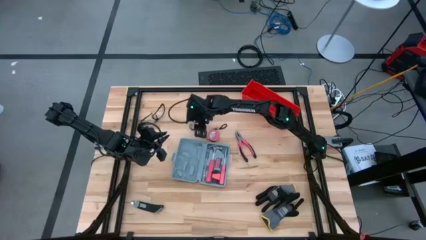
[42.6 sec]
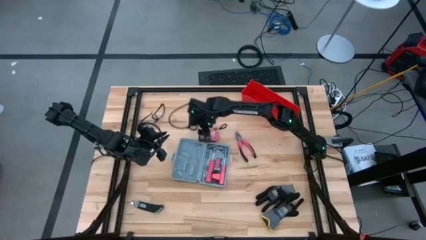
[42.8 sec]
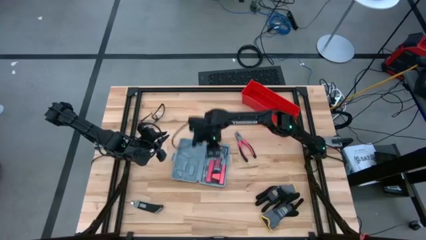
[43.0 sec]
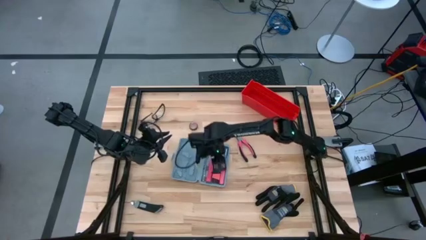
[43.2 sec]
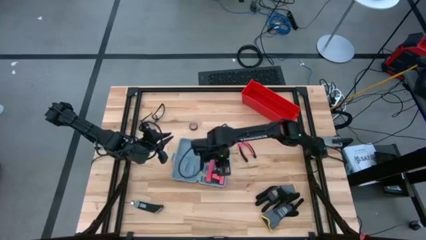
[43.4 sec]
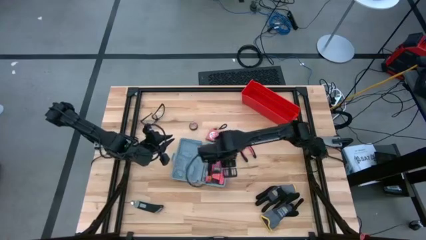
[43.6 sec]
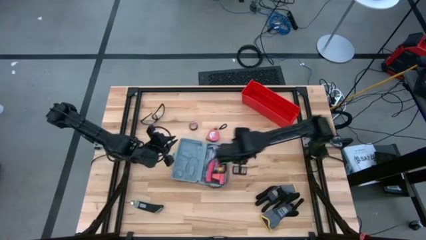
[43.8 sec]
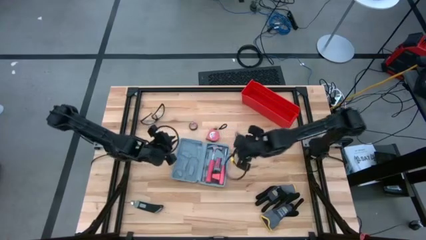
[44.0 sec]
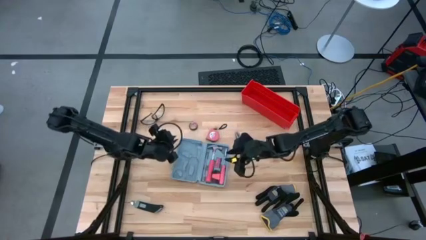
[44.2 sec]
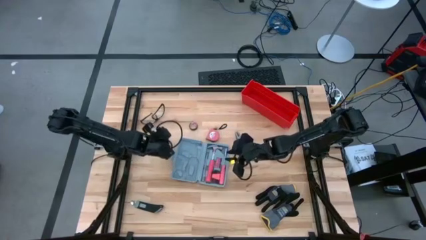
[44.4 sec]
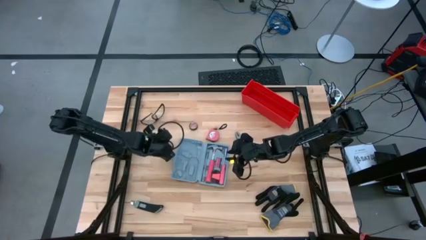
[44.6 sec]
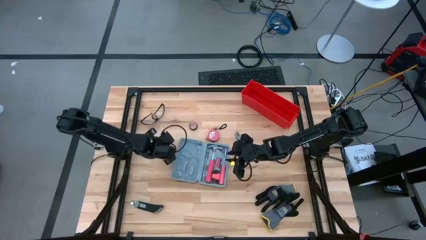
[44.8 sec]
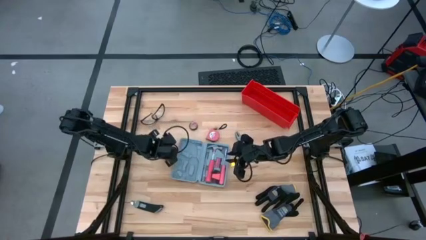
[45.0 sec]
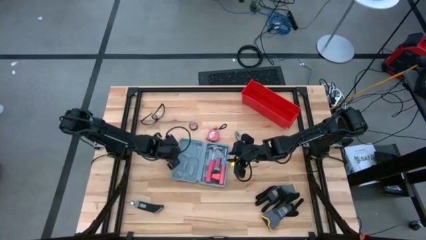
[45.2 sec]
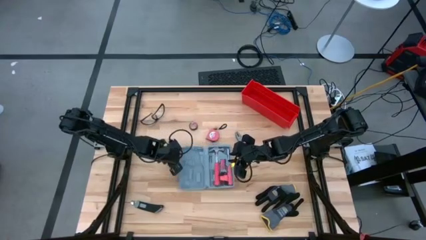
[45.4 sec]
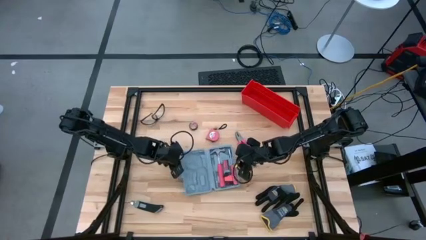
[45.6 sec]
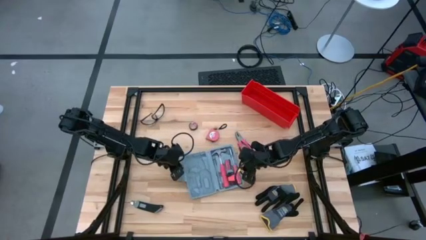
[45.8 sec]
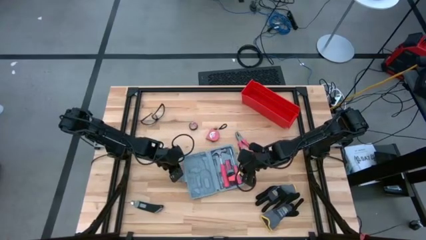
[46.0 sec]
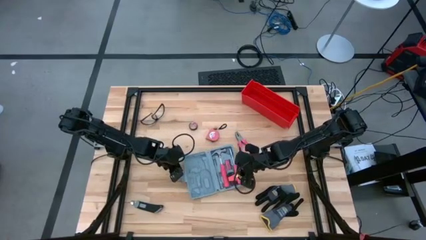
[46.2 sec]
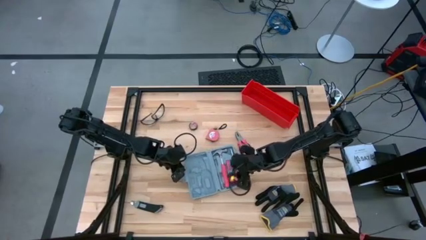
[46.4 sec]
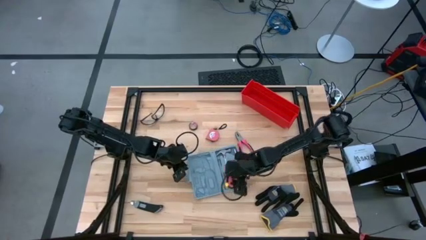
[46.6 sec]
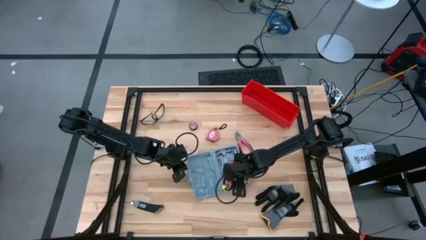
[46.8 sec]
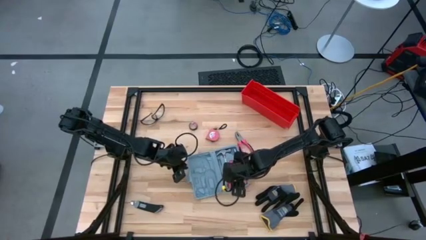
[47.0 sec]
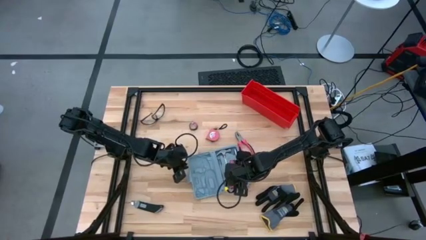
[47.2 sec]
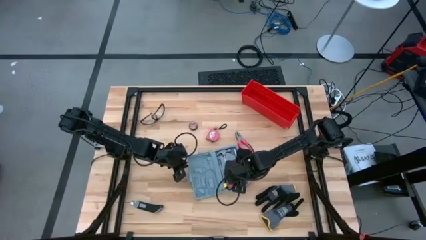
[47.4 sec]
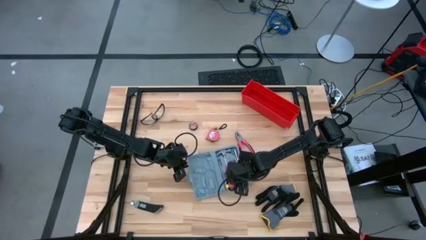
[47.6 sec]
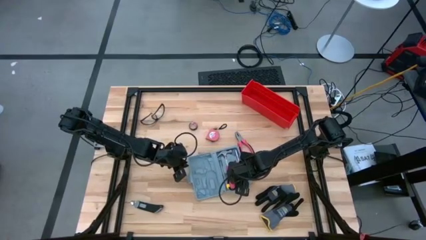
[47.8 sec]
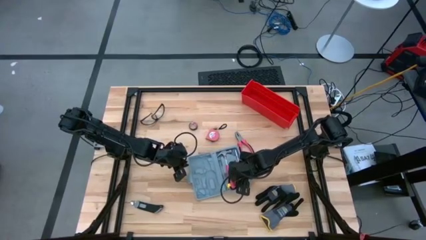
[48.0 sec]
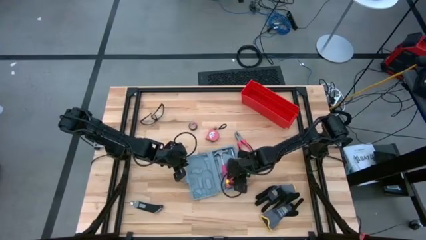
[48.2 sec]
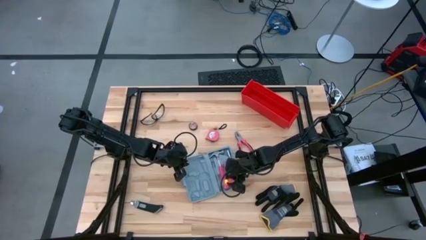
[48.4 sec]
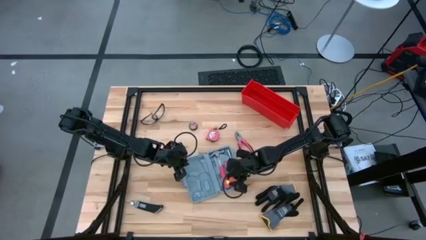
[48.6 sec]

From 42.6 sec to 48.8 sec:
Task: prefit tool cases
Remove the hex key set from the toolbox

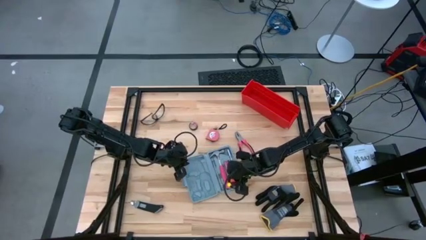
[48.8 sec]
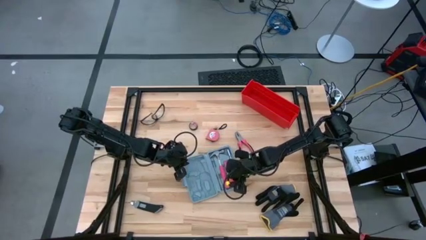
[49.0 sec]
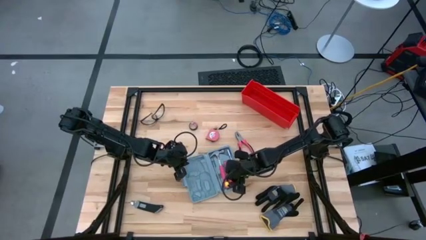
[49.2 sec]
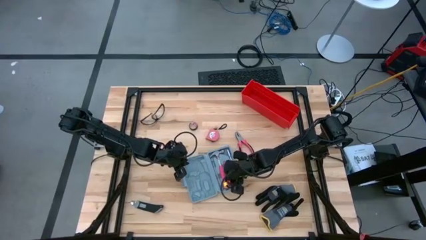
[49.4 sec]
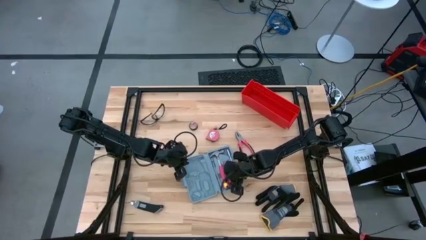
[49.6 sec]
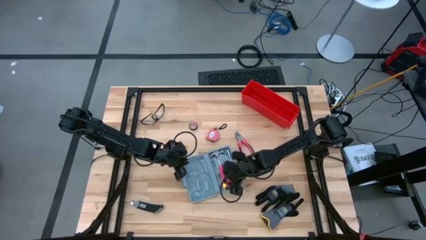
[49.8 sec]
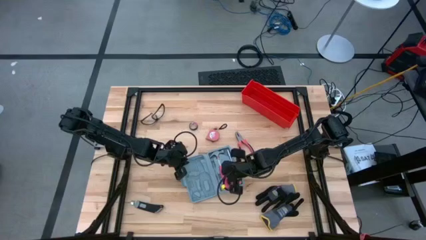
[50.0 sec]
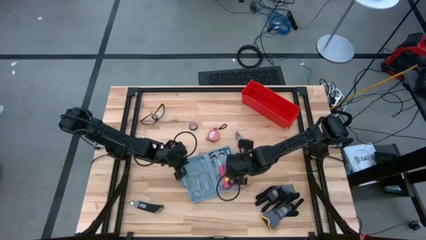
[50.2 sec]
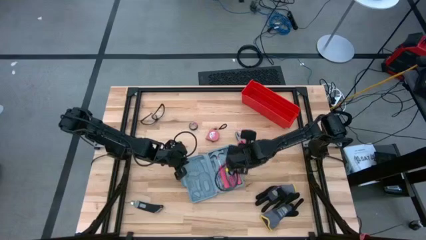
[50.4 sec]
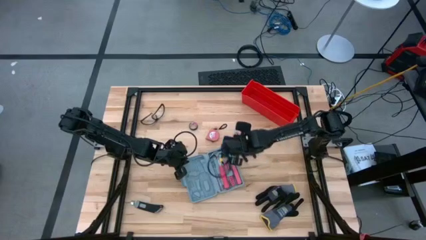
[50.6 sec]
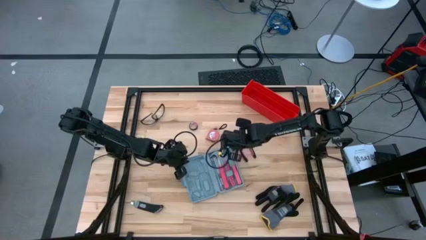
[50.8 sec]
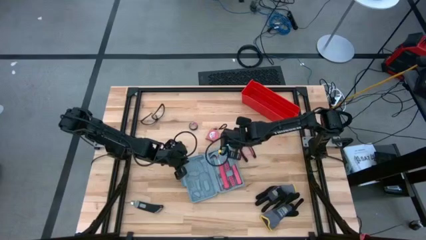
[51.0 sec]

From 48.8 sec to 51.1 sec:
Remove the hex key set from the toolbox

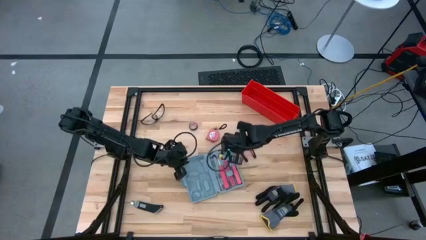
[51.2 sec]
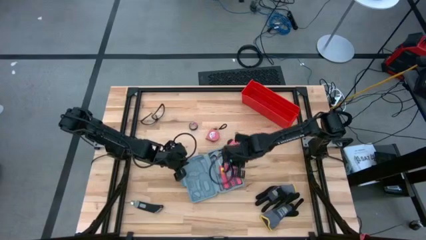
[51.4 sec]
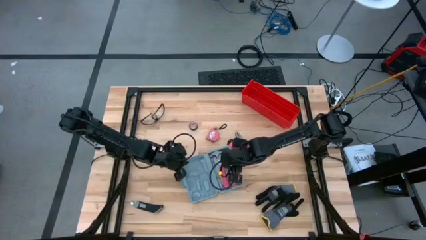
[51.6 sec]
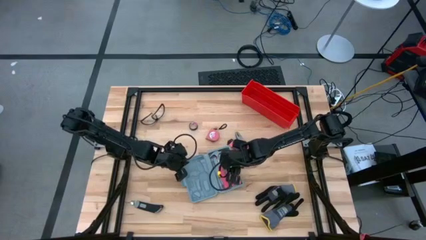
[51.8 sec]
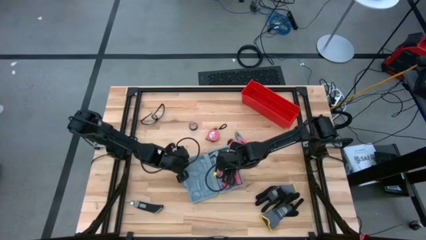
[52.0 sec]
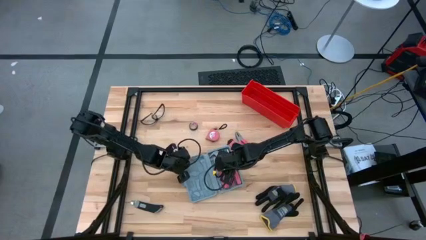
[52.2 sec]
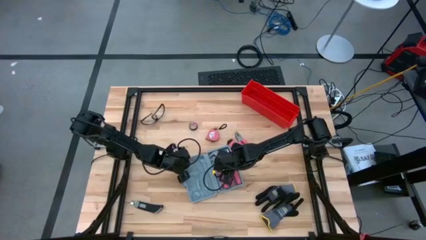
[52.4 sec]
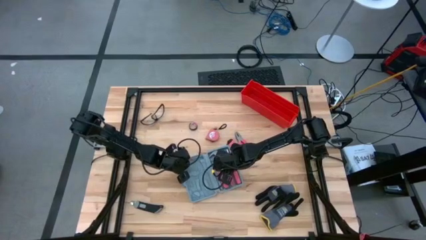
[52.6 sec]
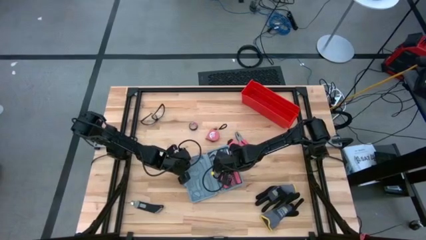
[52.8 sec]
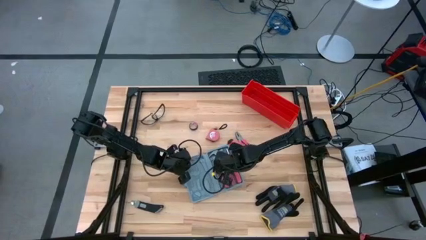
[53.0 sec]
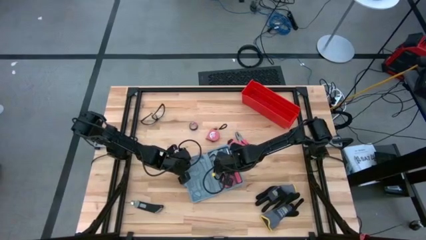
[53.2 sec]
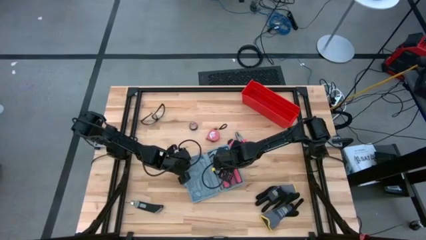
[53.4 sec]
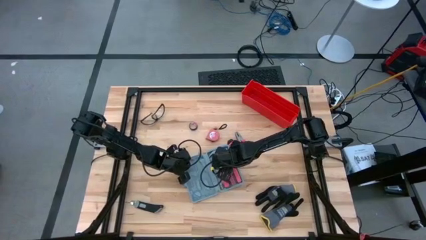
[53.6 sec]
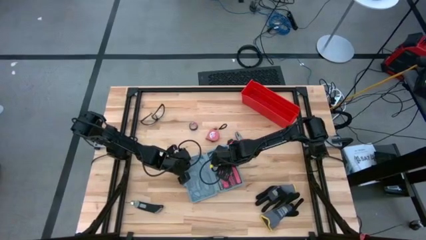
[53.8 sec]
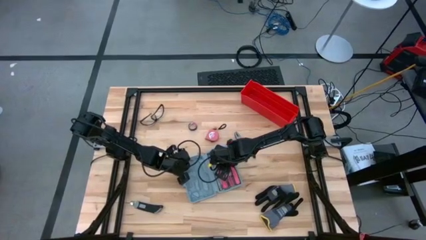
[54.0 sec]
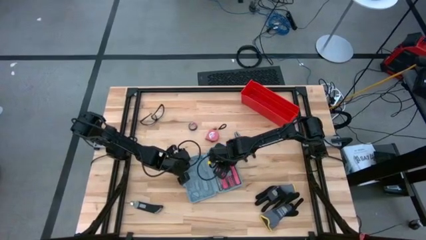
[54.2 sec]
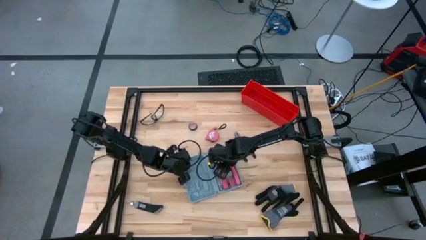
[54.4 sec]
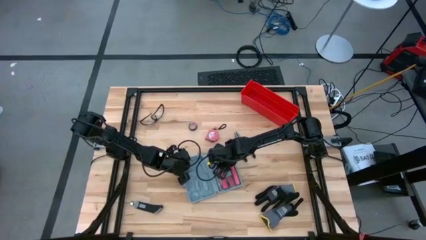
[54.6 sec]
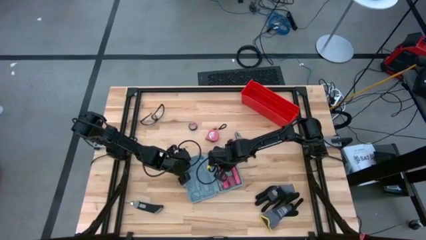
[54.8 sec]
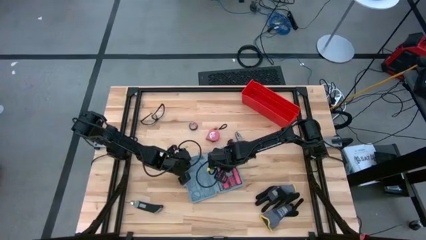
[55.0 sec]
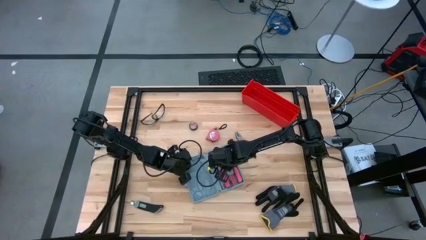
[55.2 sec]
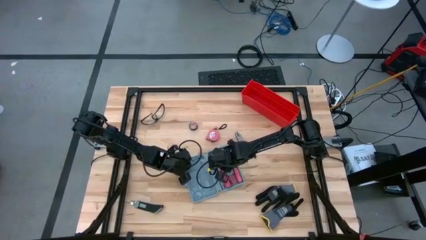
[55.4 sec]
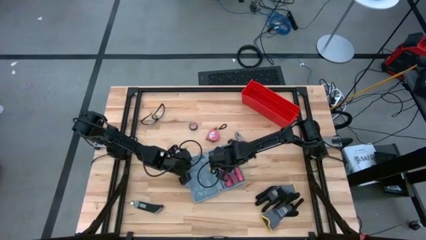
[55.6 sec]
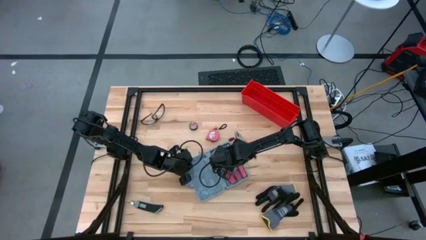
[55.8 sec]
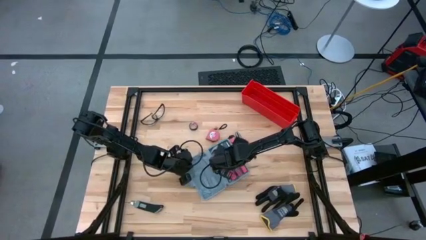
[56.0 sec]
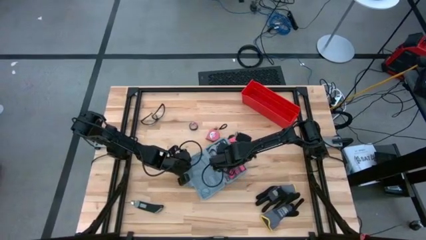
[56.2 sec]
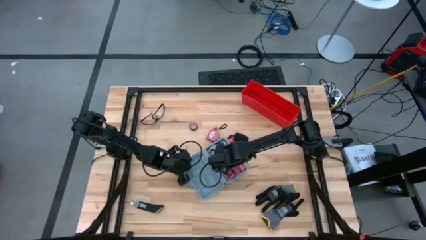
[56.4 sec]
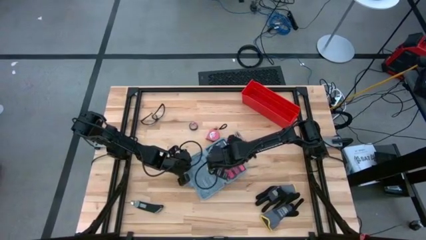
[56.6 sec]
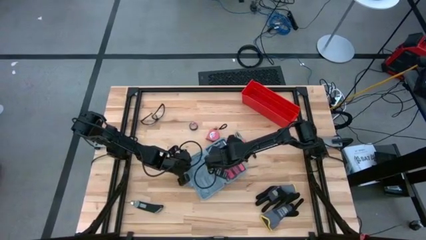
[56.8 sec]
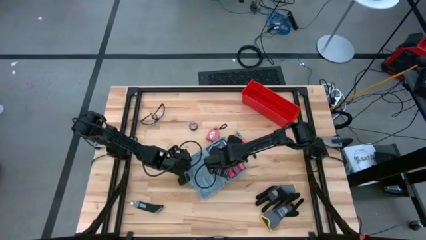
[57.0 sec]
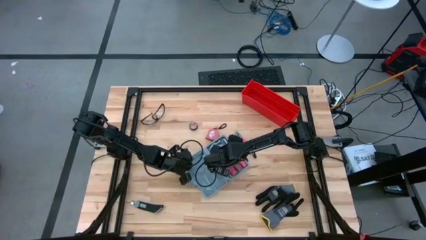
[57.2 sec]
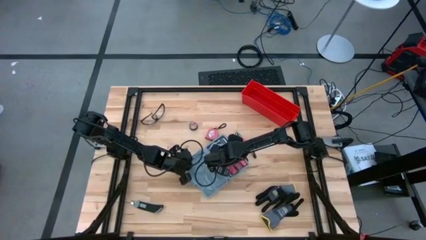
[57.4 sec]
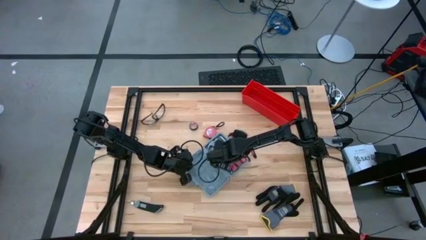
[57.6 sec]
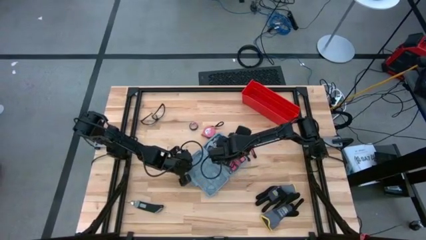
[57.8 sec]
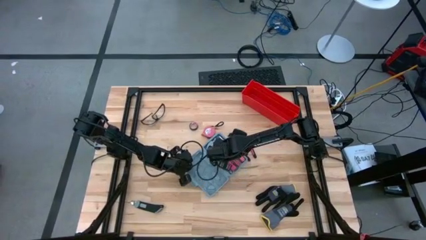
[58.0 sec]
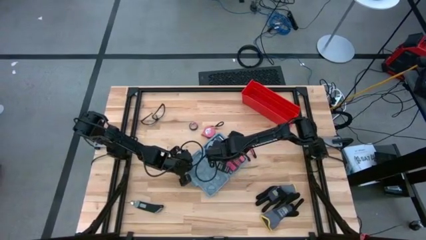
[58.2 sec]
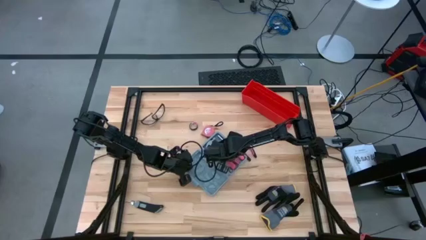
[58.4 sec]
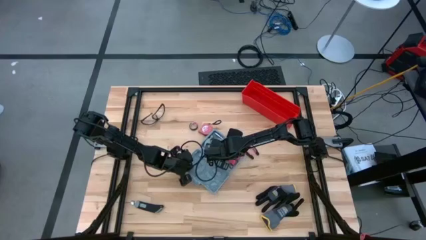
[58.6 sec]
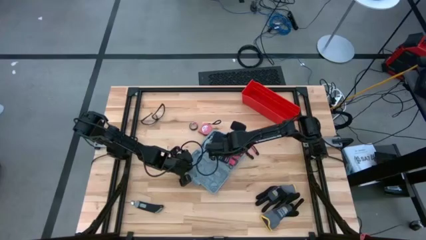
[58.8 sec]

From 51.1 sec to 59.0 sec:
Remove the screwdriver bits from the toolbox

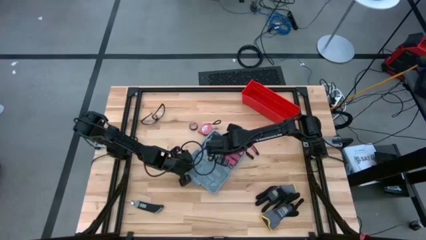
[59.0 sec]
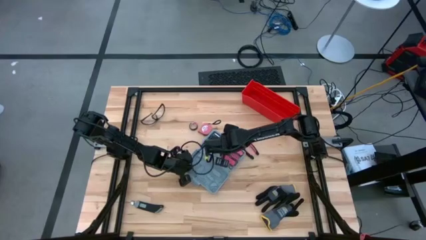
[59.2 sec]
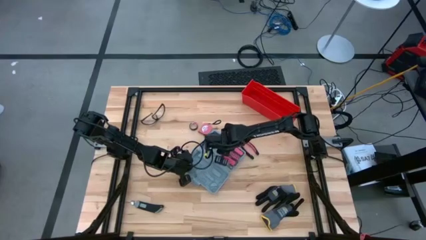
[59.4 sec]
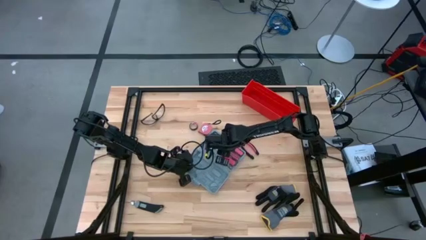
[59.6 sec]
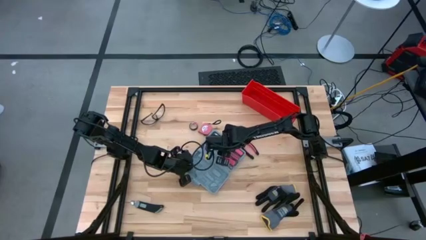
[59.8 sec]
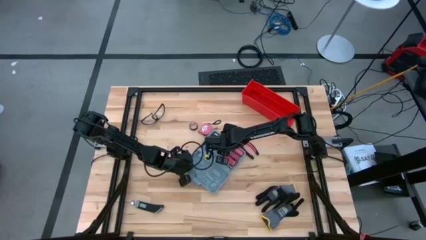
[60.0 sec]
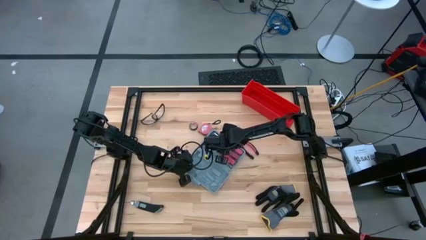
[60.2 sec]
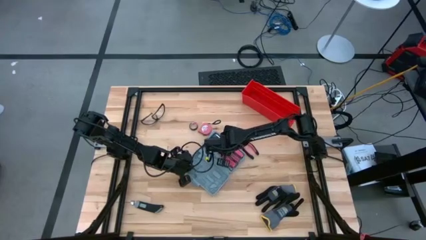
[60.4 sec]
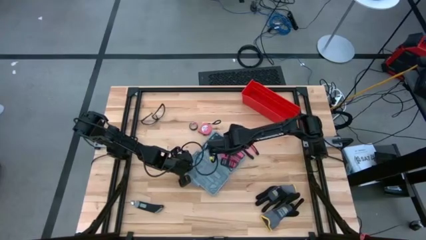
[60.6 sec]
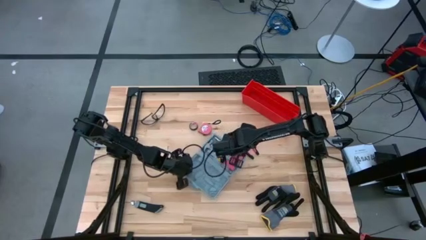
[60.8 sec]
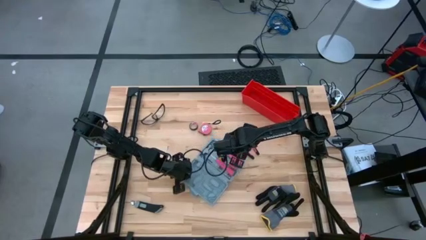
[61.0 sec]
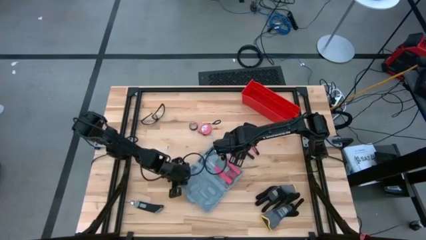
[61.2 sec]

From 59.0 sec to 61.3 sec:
Remove the screwdriver bits from the toolbox
